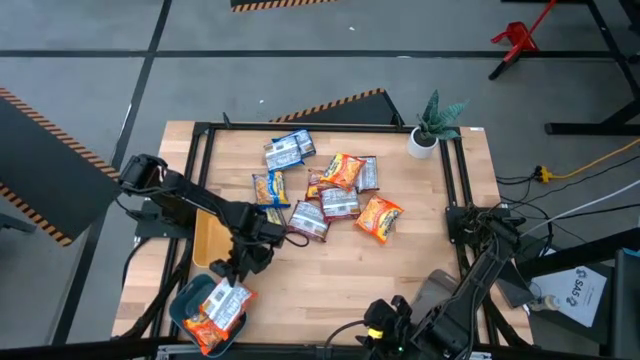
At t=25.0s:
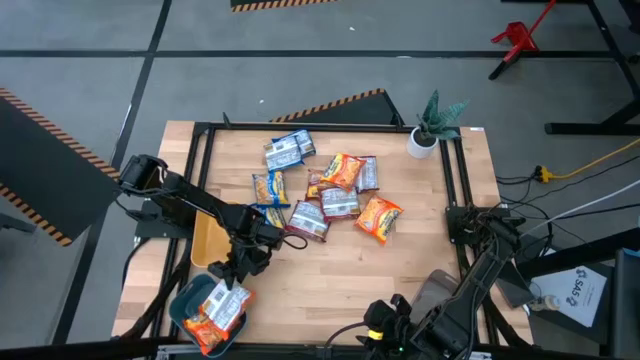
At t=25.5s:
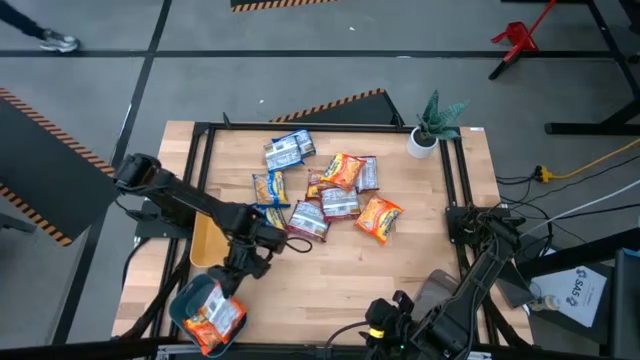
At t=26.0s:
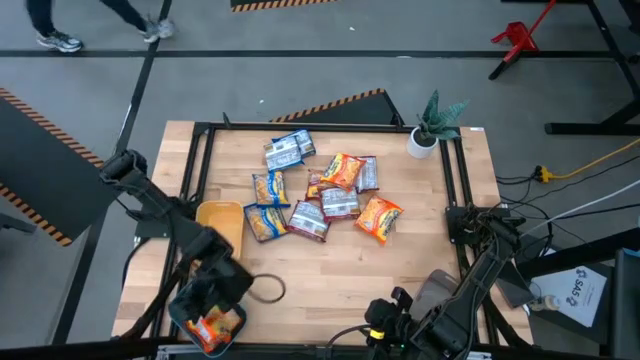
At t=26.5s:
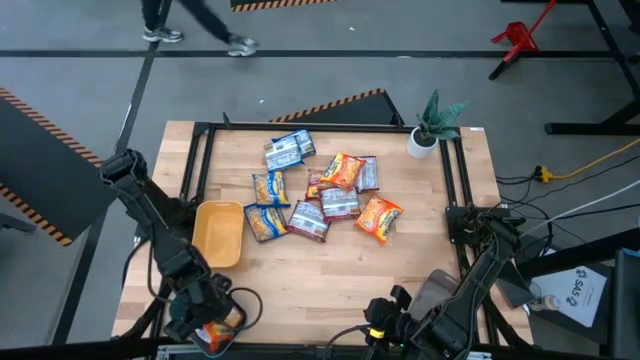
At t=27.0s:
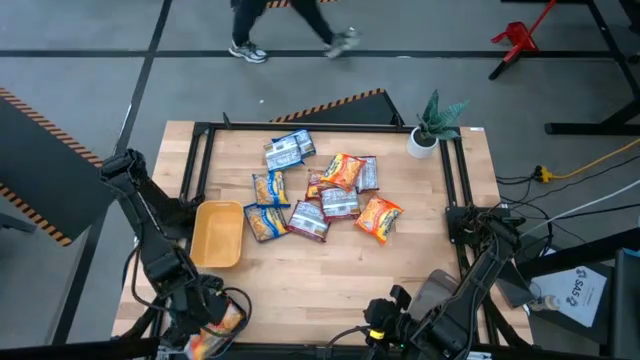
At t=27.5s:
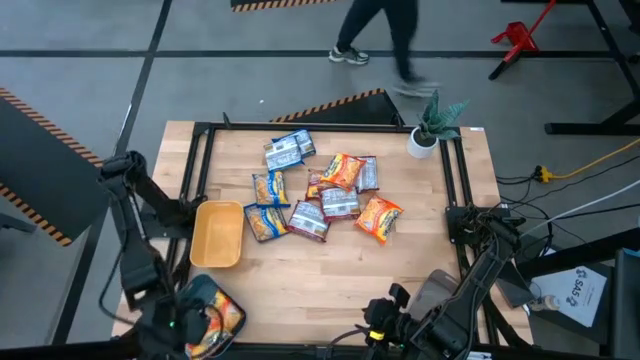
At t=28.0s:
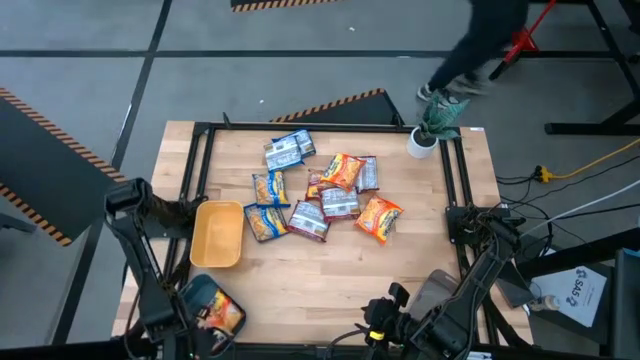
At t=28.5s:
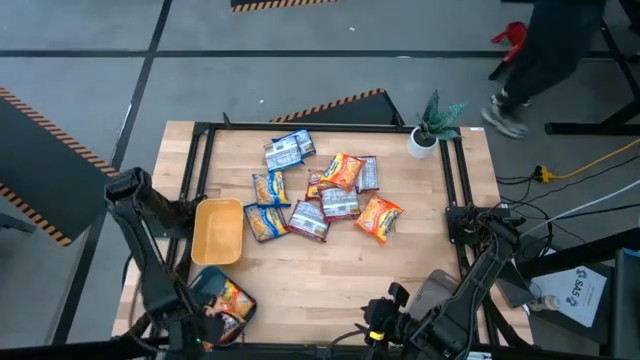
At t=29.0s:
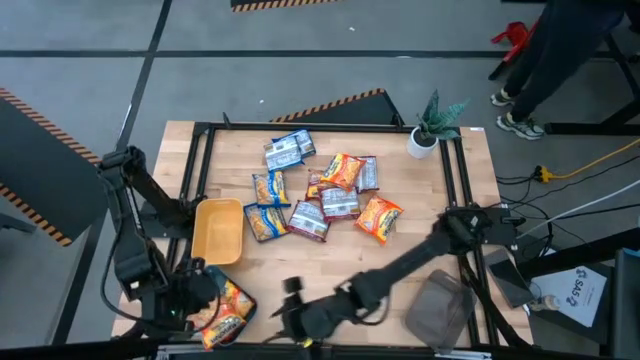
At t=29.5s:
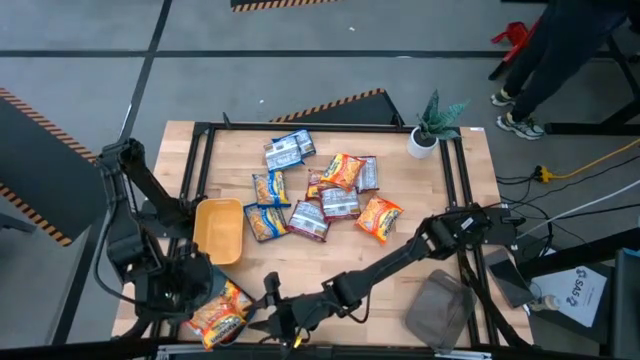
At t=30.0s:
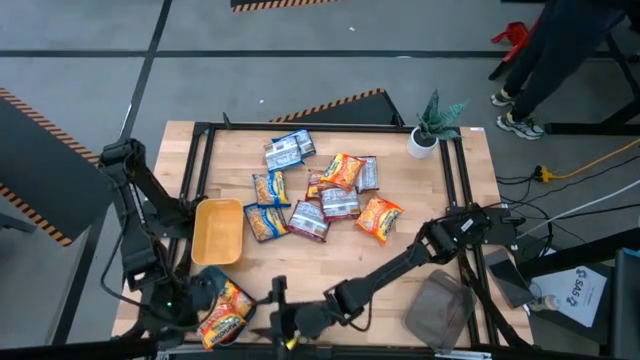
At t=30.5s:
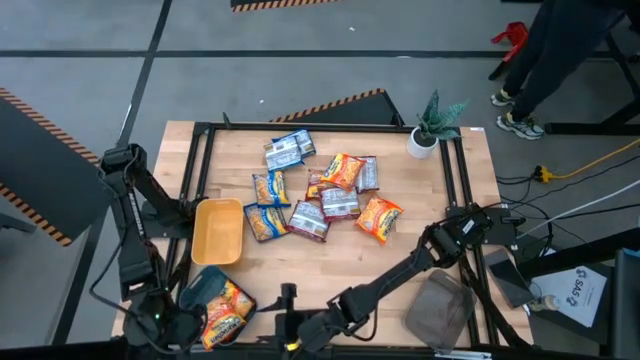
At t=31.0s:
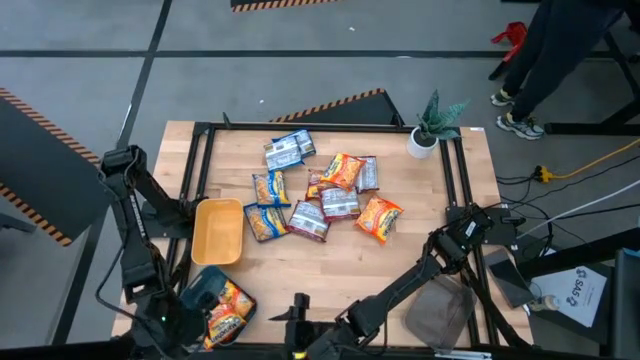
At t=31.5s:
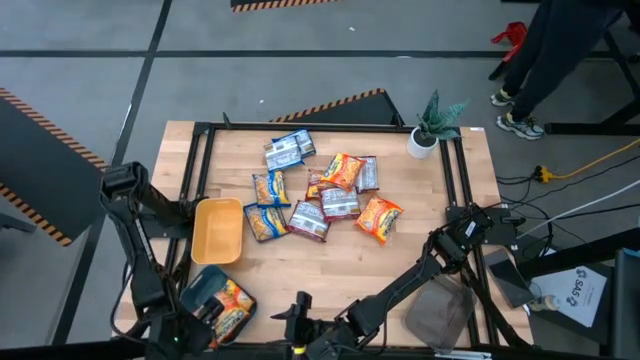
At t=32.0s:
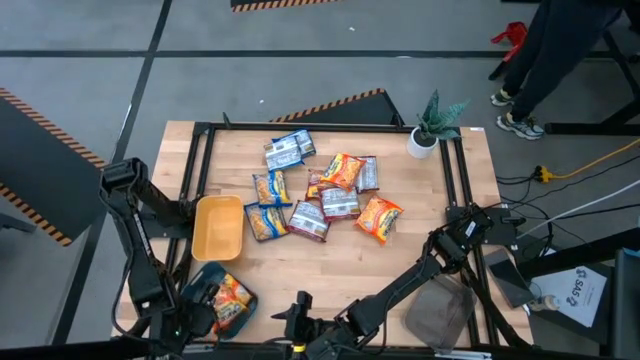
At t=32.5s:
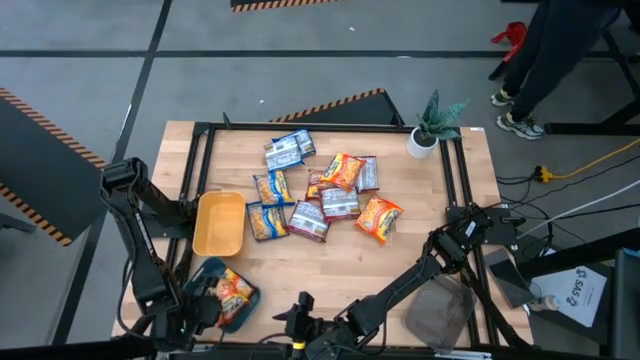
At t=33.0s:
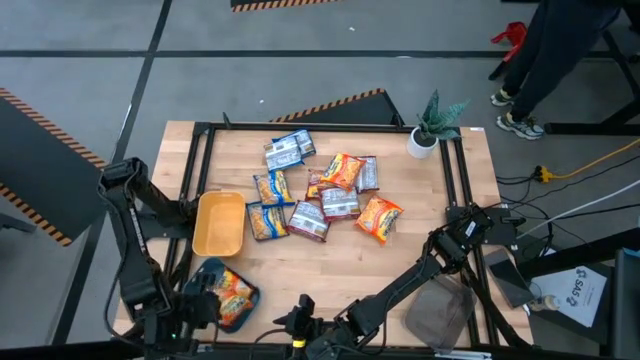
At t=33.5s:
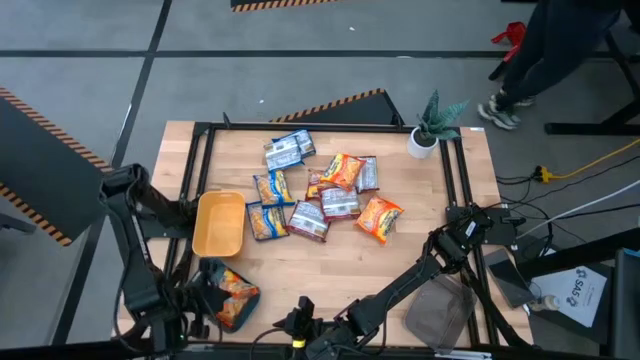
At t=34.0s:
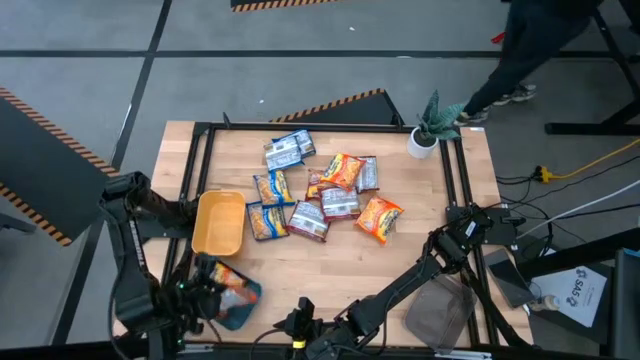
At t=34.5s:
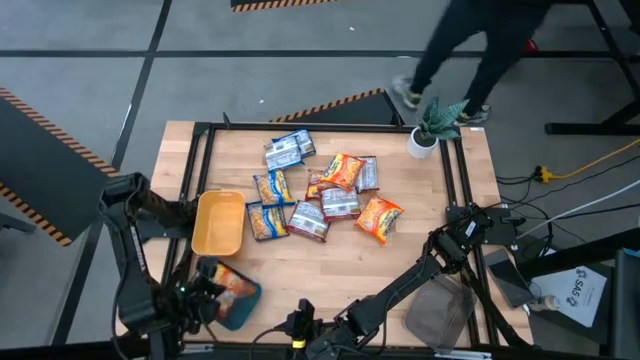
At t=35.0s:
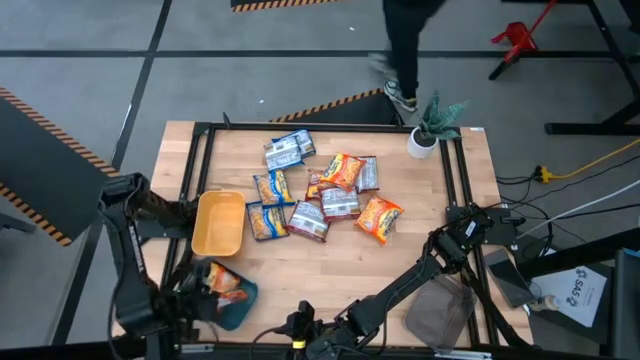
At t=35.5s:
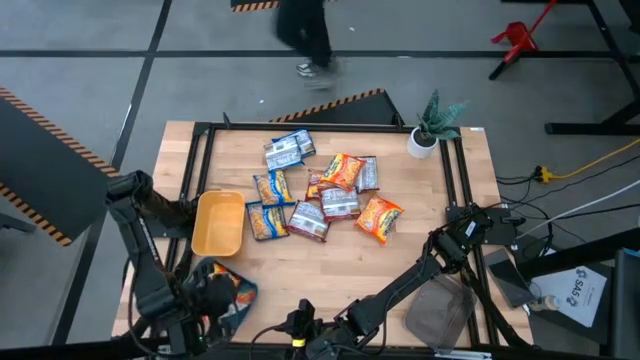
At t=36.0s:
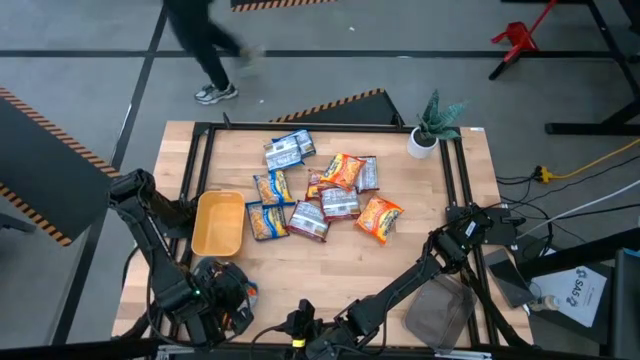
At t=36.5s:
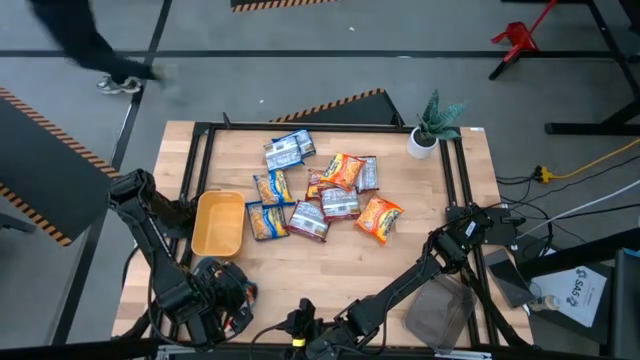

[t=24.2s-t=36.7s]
Task: Sort Maruchan noodles
Put the orange noodle pack into the blue bin

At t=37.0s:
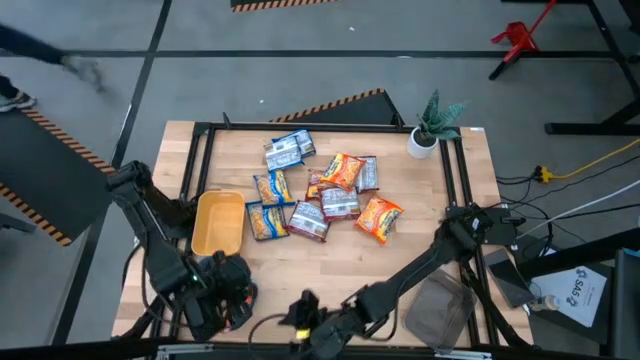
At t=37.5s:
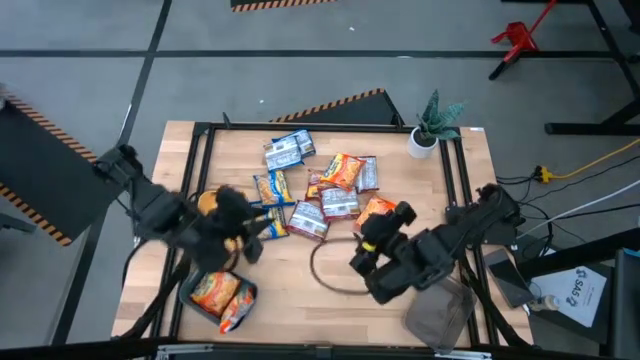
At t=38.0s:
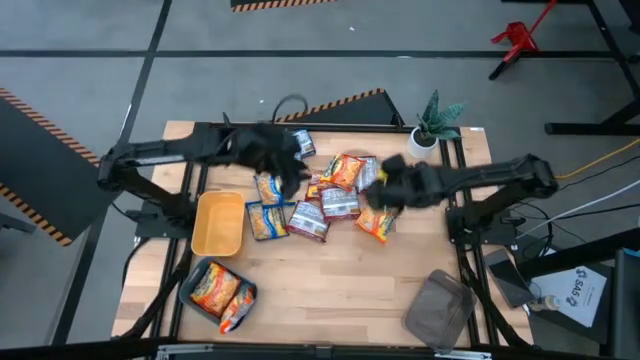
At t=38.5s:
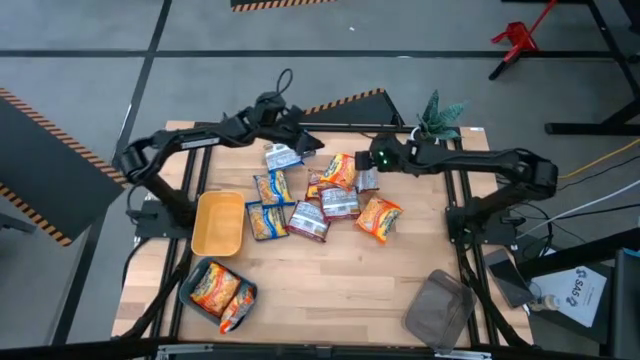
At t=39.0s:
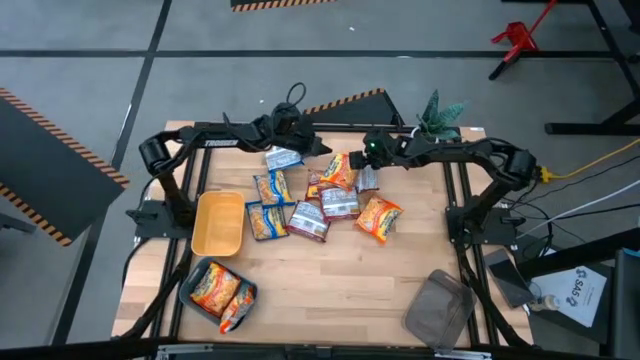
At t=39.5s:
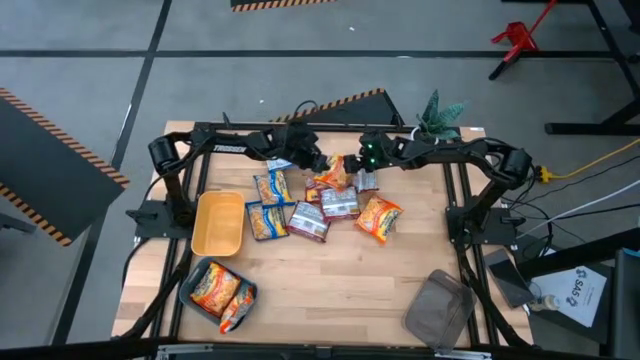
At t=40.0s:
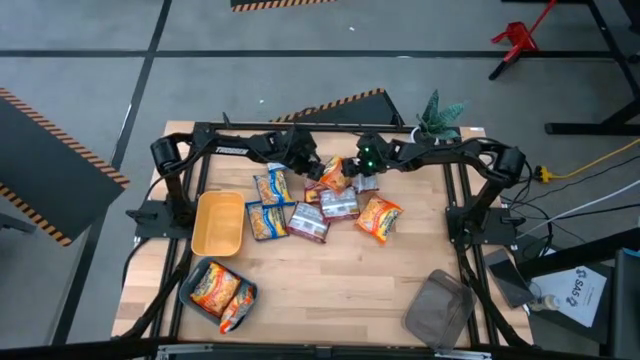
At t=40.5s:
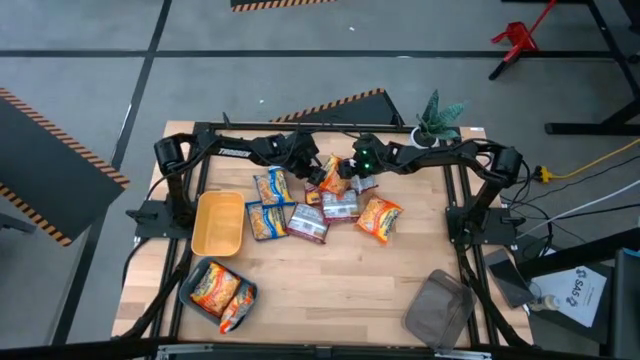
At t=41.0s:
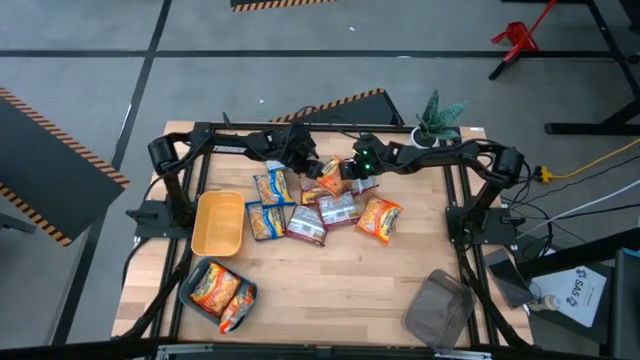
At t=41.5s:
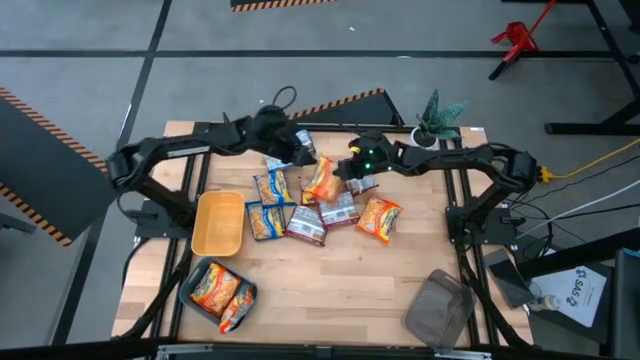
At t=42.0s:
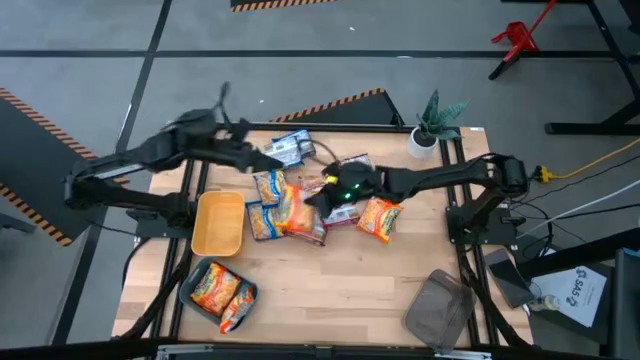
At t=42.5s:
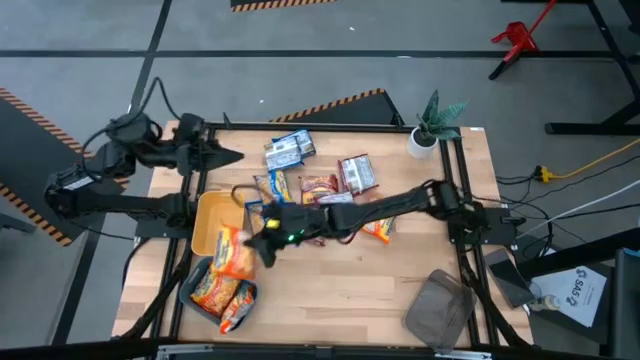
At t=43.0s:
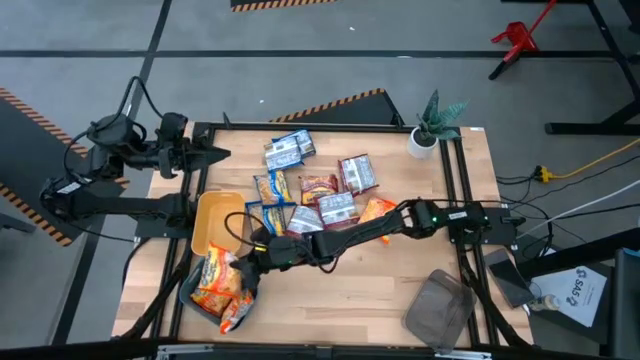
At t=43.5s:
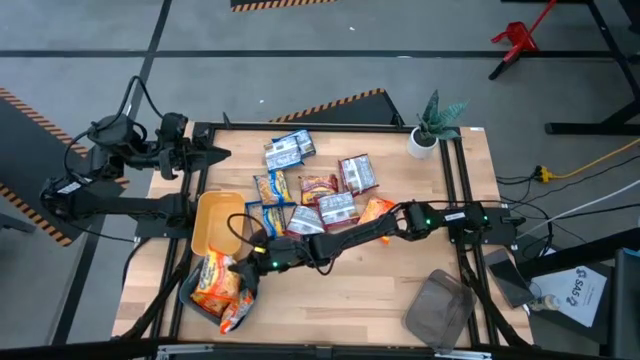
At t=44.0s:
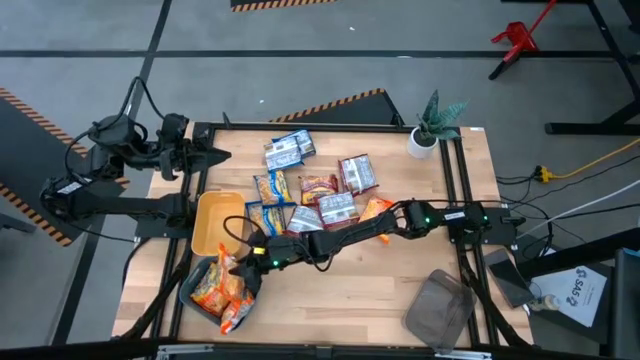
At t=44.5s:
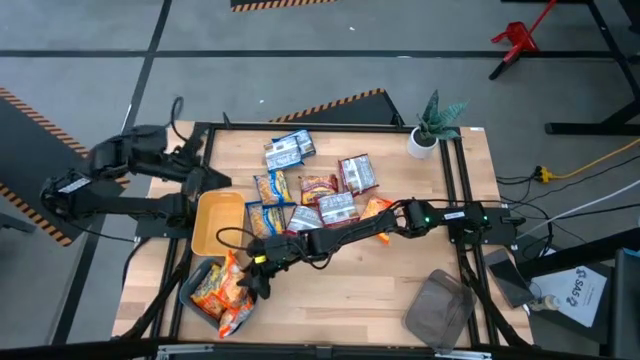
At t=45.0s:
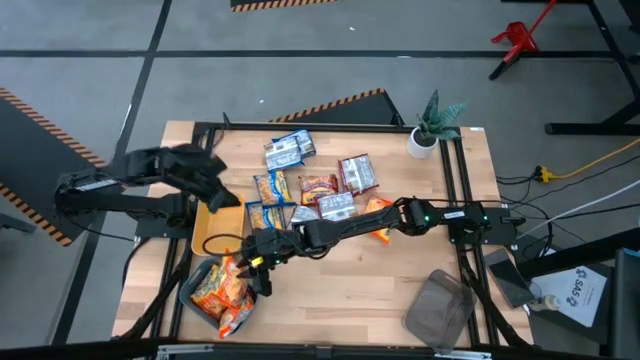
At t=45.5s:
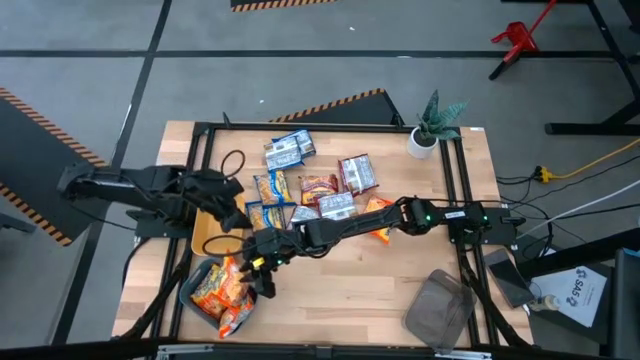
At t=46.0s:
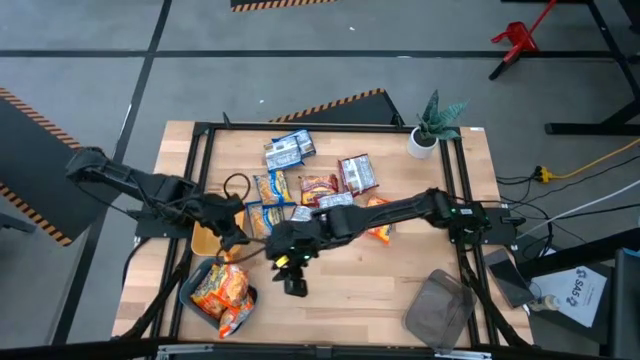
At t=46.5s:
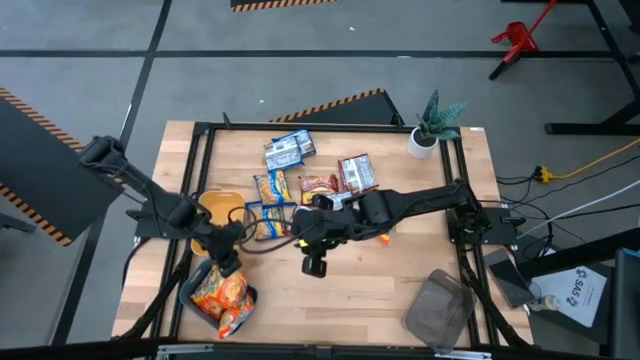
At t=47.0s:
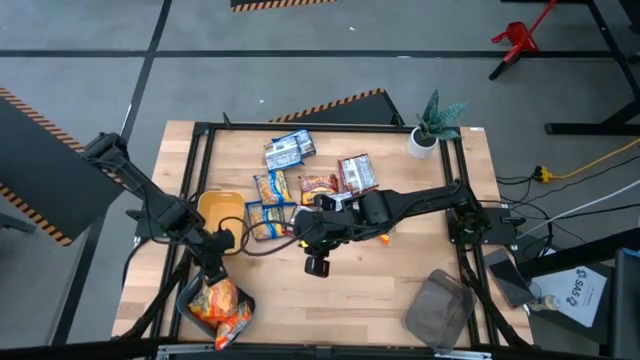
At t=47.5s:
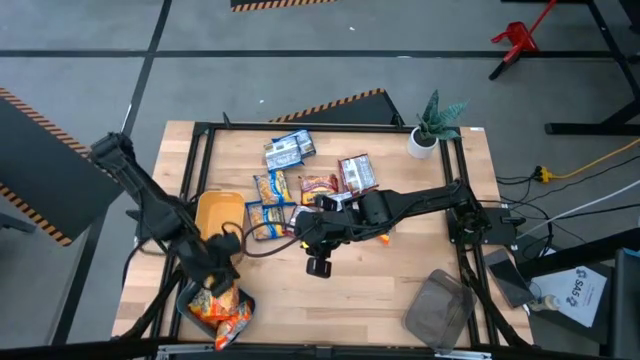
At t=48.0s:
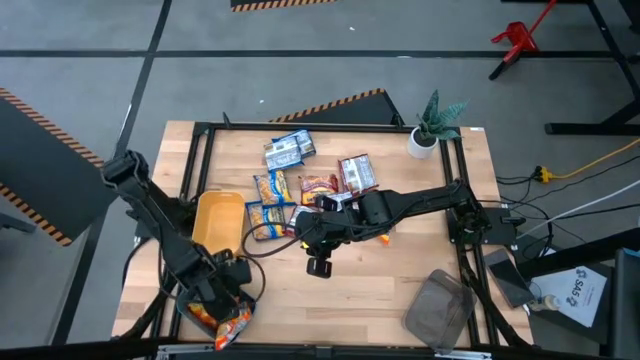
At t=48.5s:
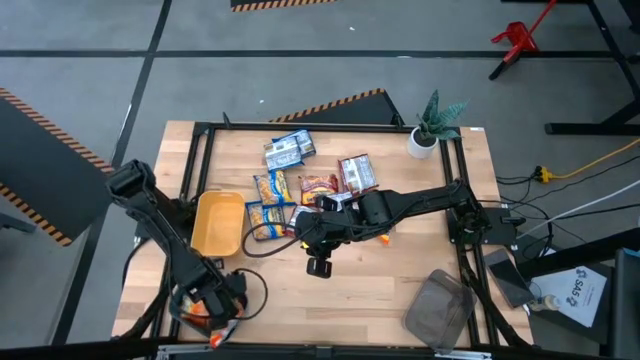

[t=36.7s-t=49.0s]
Put the orange noodle pack into the blue bin
